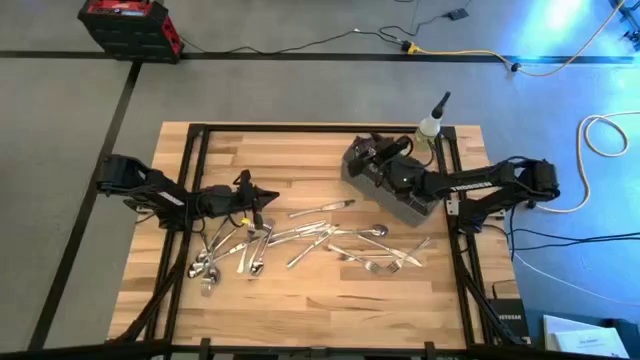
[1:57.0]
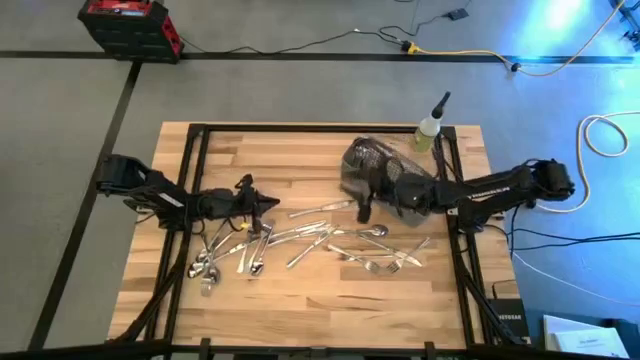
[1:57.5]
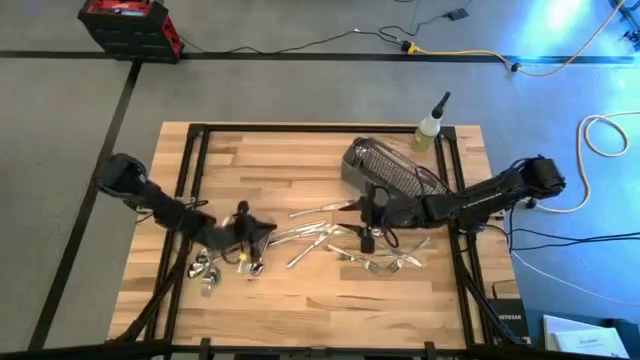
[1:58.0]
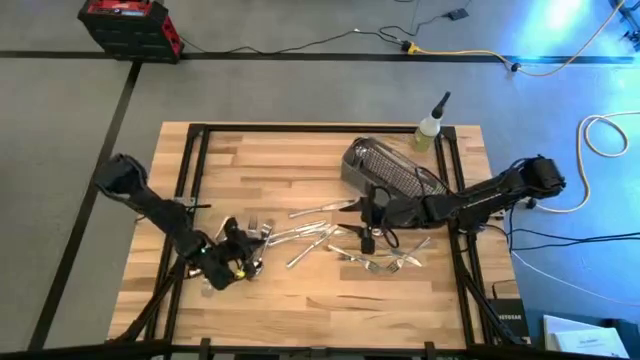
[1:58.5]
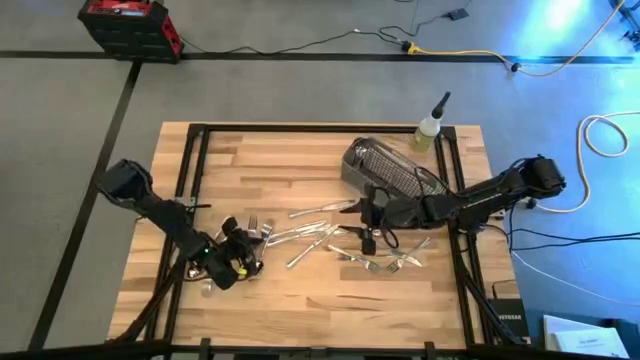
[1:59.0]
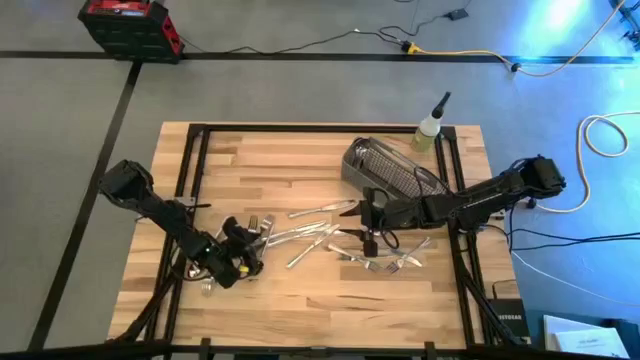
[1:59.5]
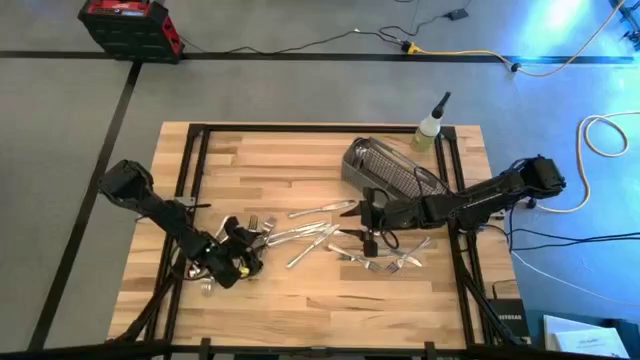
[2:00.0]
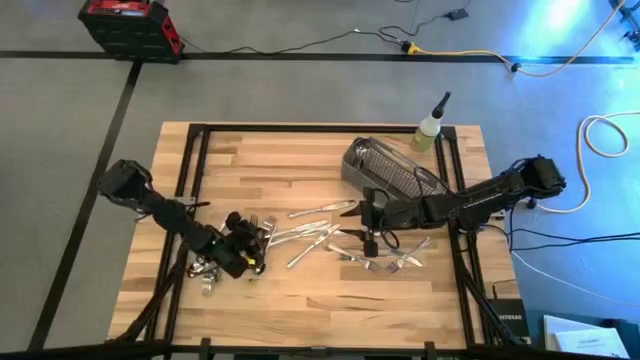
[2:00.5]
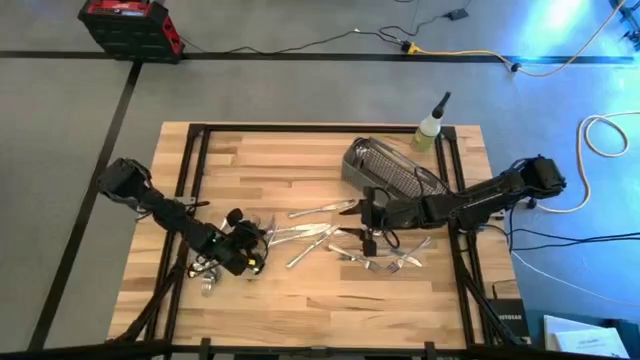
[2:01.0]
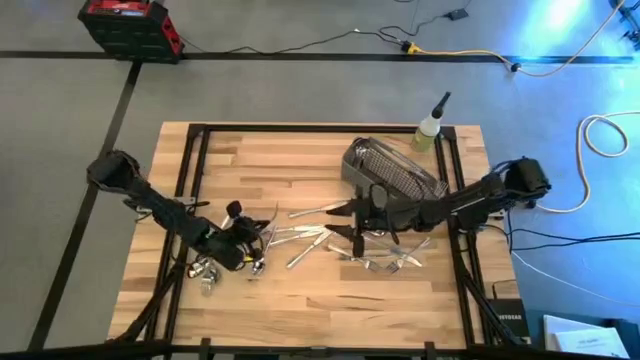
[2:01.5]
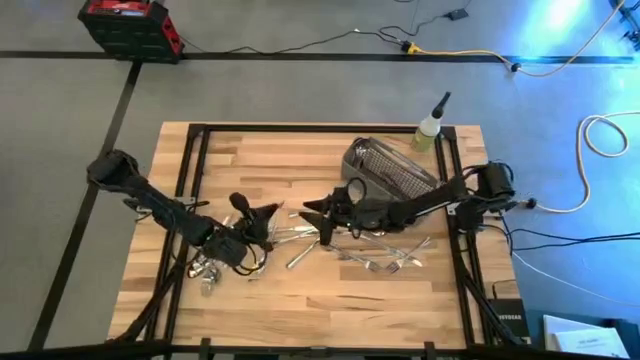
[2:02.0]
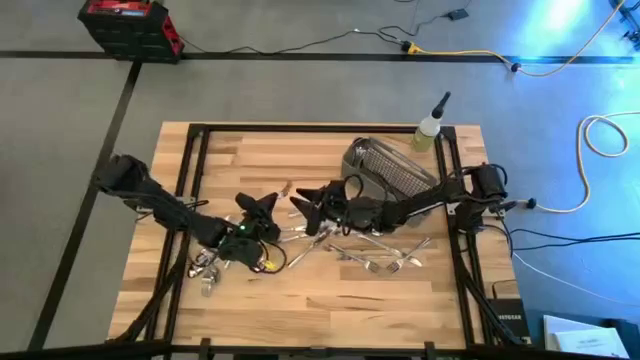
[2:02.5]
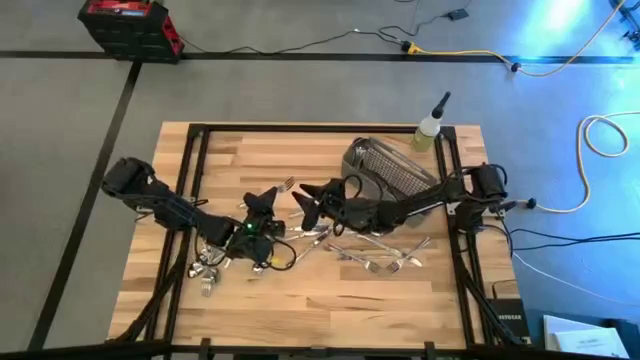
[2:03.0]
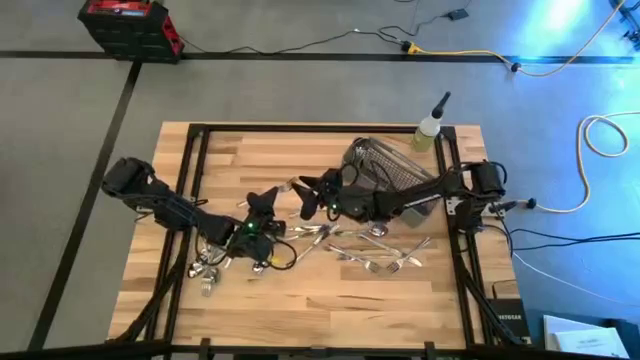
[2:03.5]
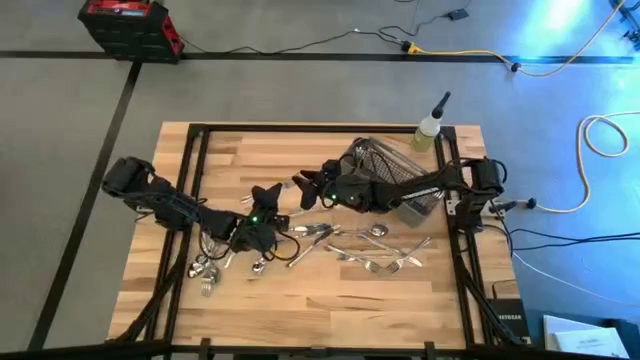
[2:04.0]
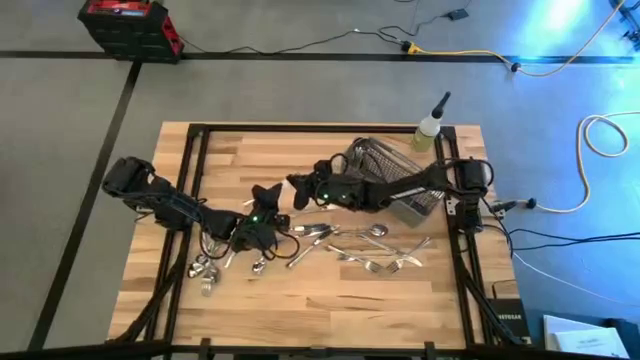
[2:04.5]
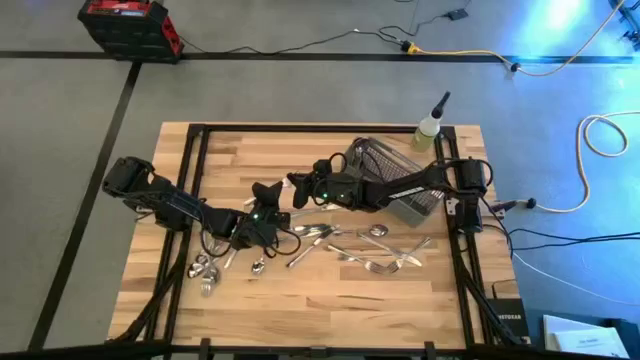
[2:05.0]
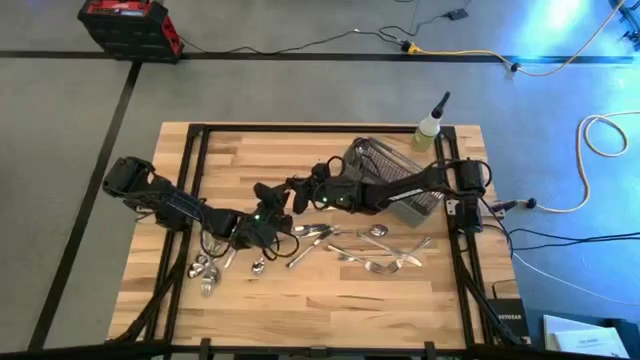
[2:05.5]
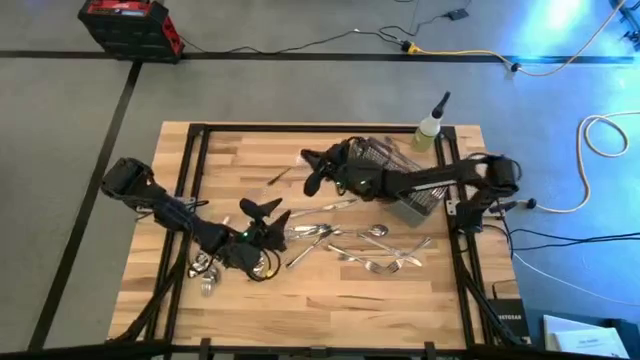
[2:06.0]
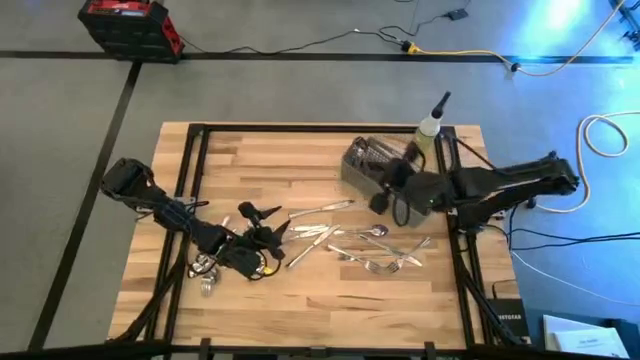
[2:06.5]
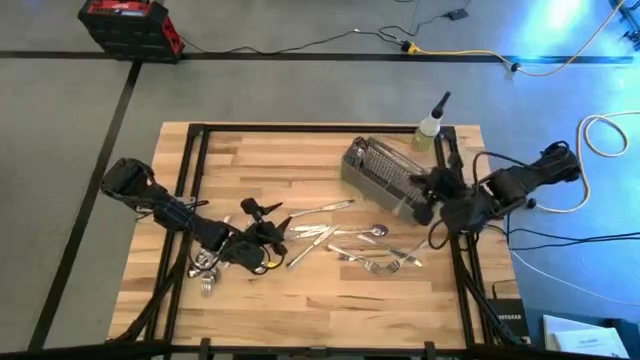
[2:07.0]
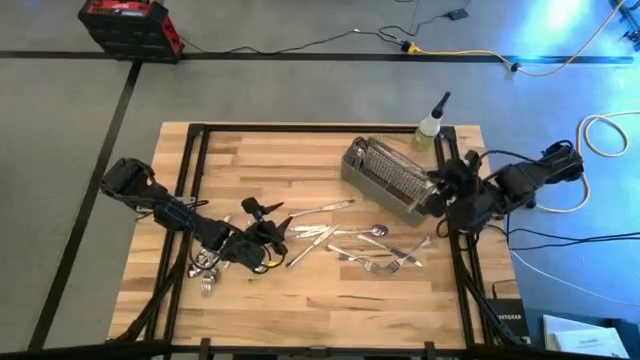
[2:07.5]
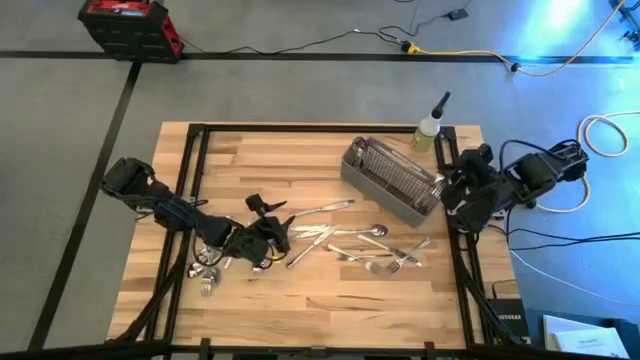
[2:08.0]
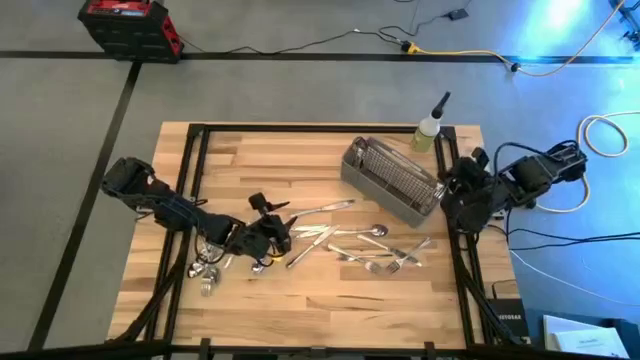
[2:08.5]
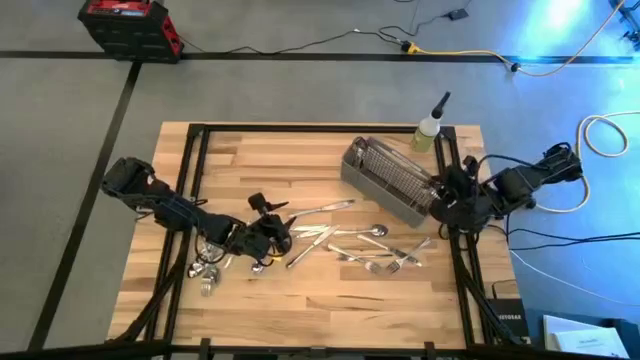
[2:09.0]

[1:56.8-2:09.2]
Task: Sort silverware
Put the silver spoon into the gray silverware organizer

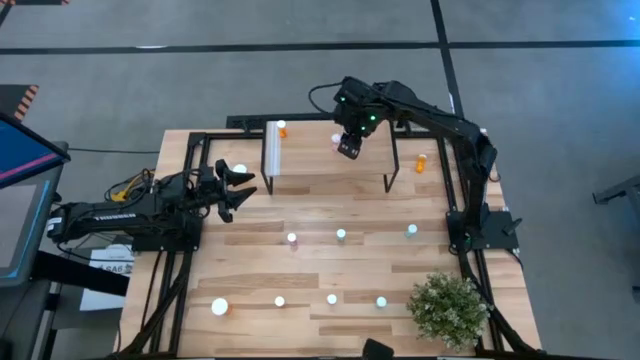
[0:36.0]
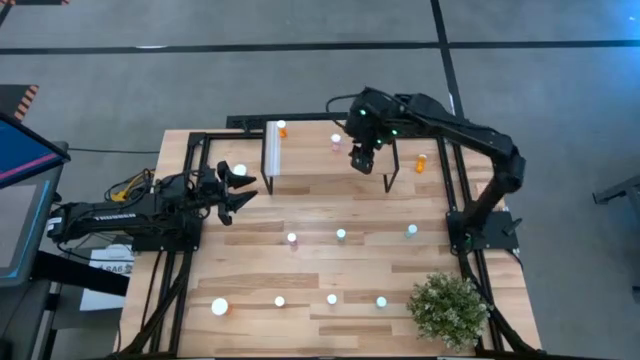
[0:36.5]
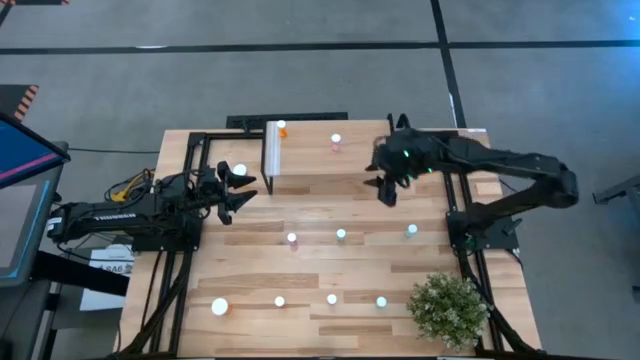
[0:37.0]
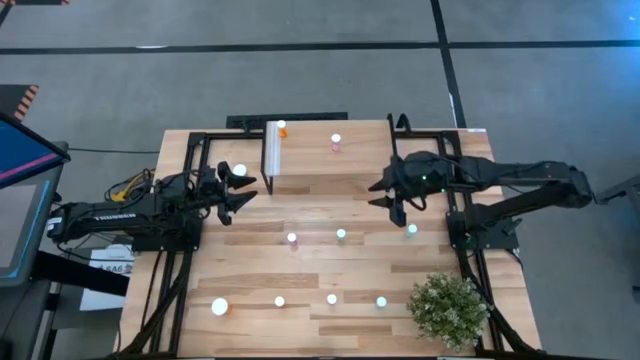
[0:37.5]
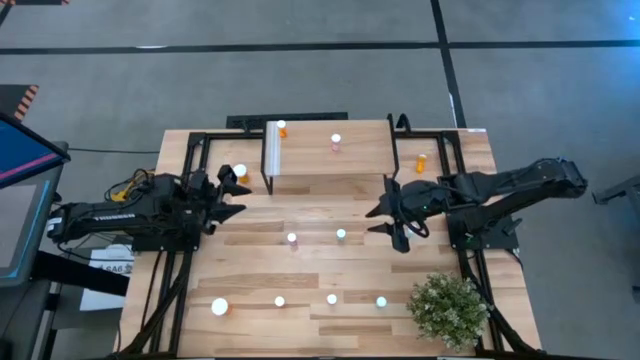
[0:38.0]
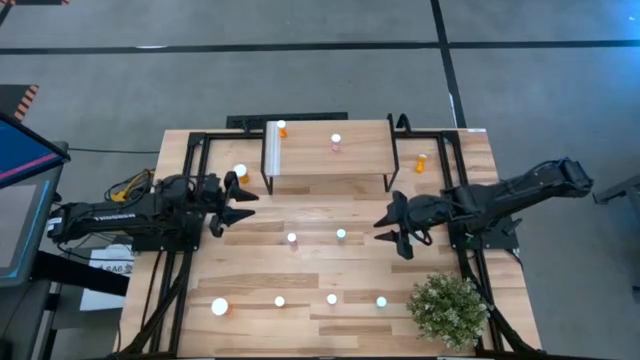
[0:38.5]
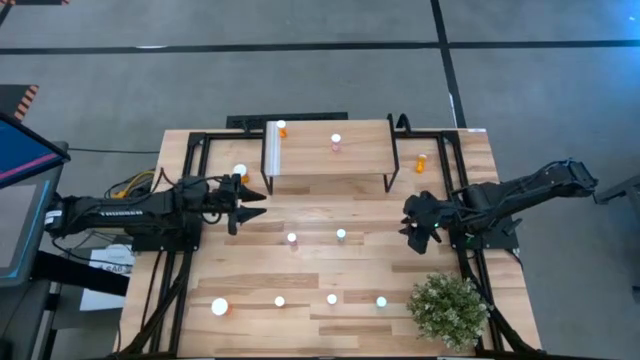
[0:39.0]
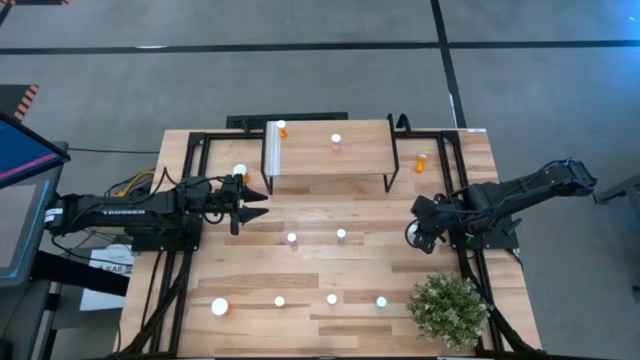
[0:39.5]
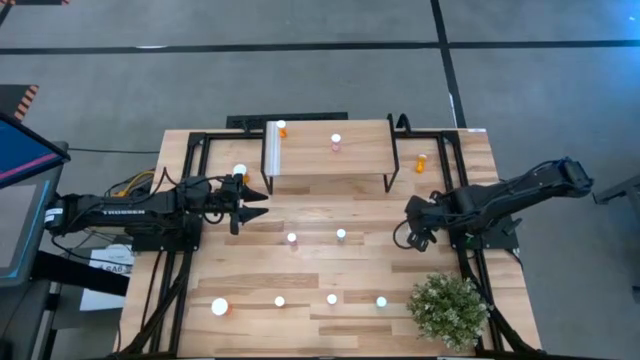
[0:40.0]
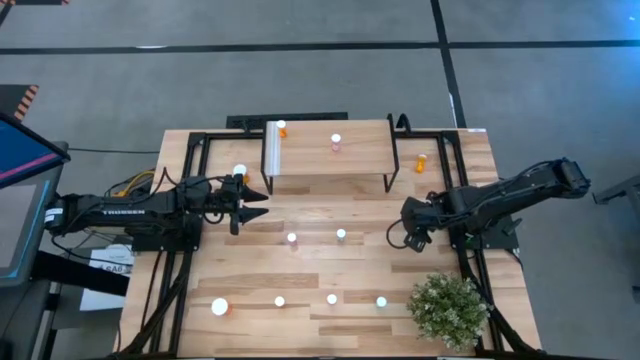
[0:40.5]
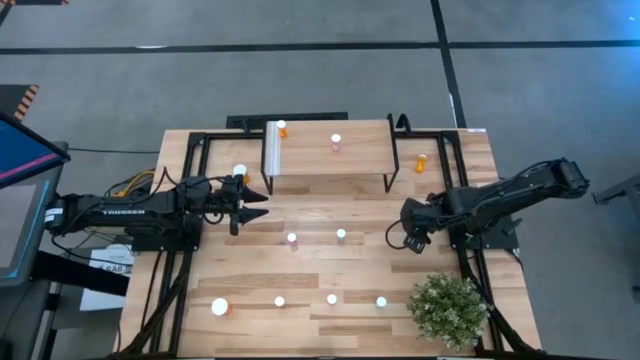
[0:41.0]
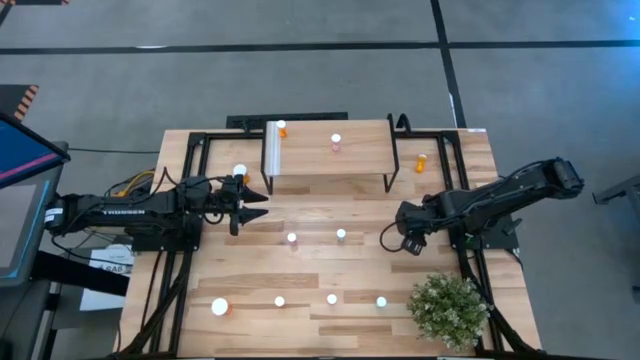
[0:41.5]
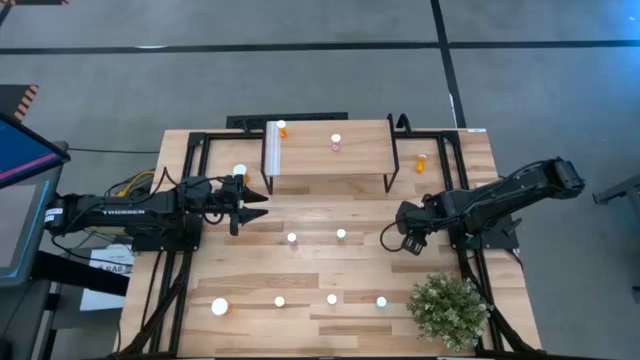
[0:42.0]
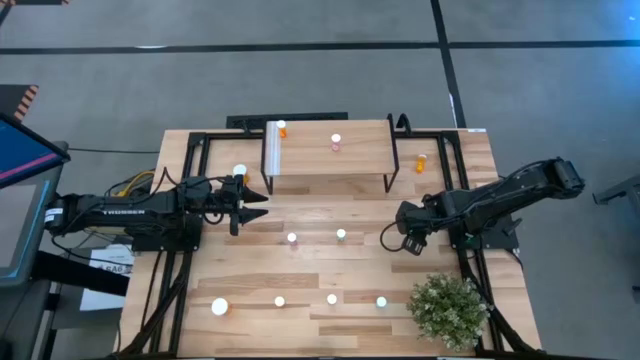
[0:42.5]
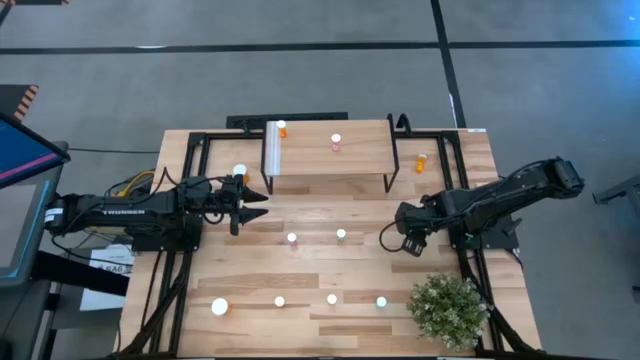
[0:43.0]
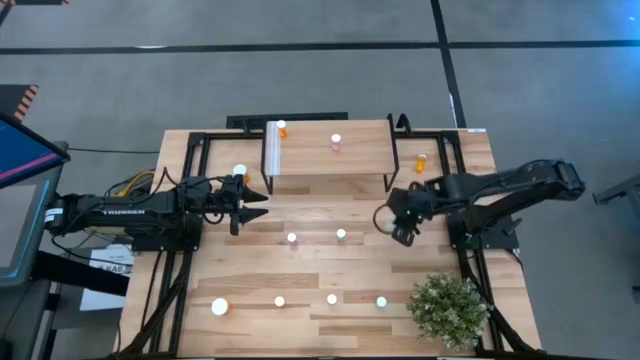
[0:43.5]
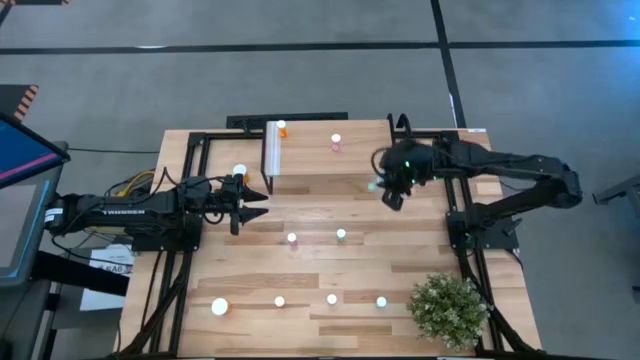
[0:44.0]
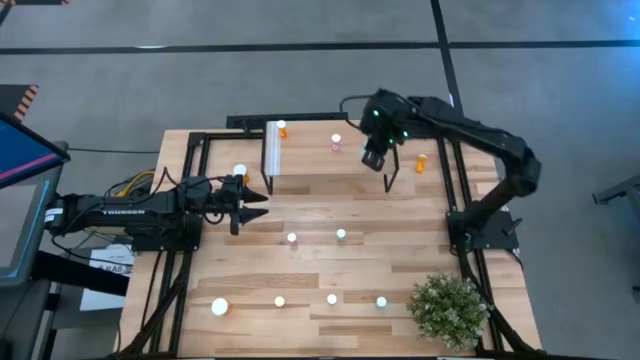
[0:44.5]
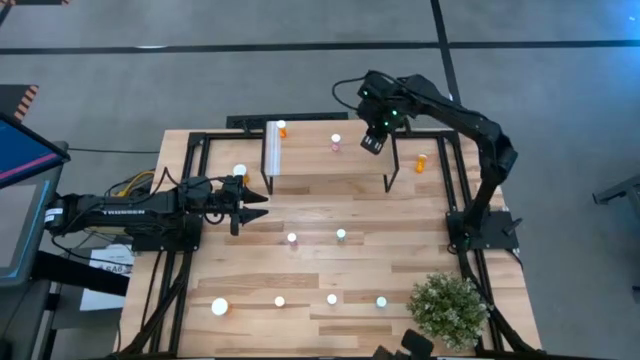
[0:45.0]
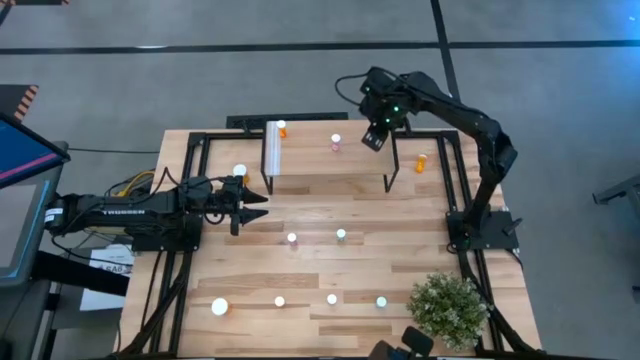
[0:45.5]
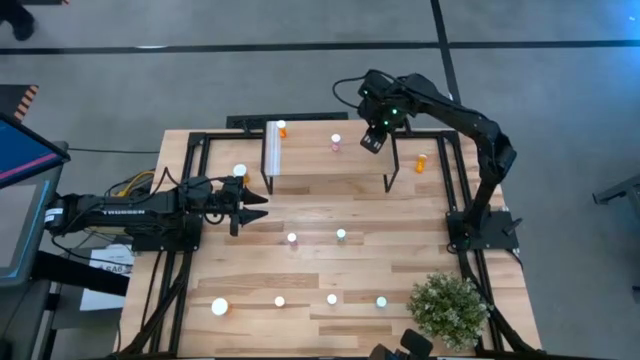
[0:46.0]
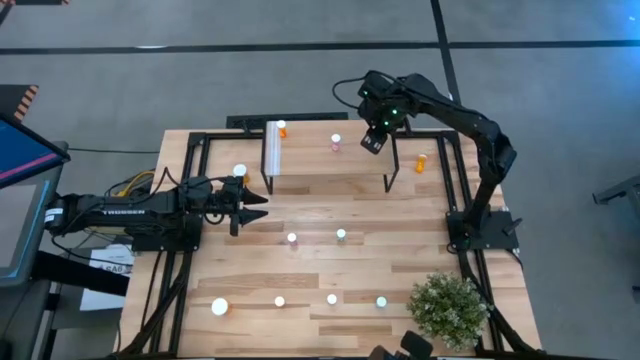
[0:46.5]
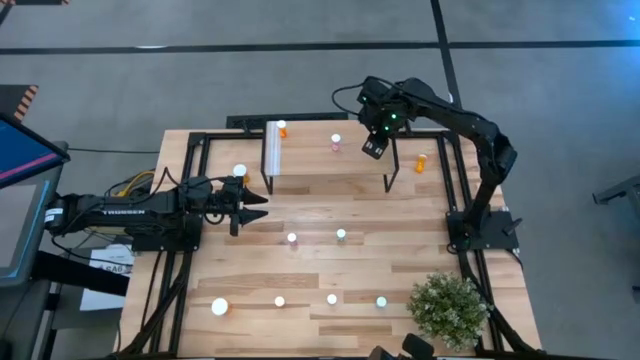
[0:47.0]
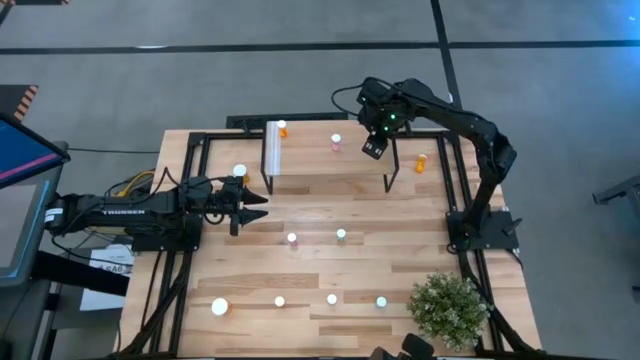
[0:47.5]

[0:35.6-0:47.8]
Task: Pick and place medicine bottles onto shelf by color
Put the top right blue pill bottle on the shelf
